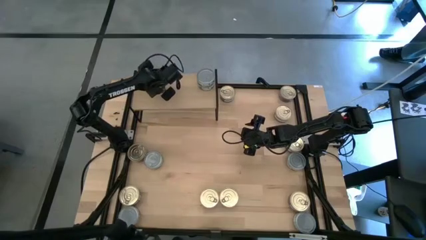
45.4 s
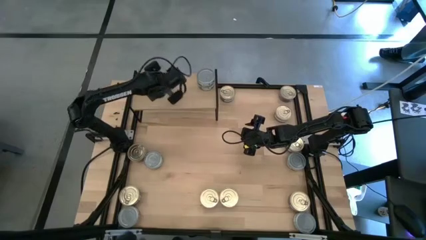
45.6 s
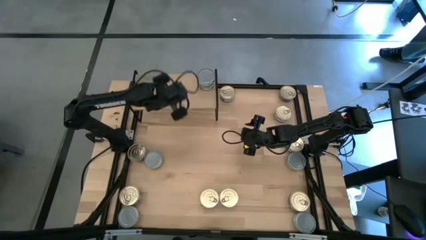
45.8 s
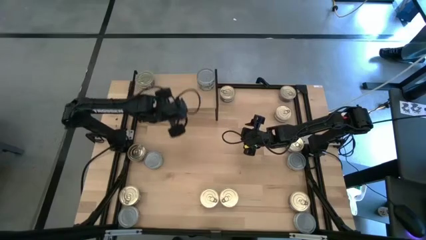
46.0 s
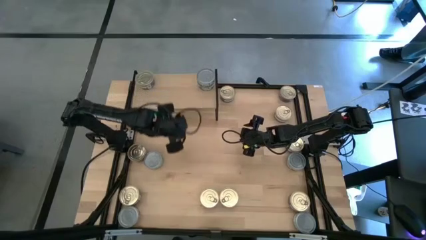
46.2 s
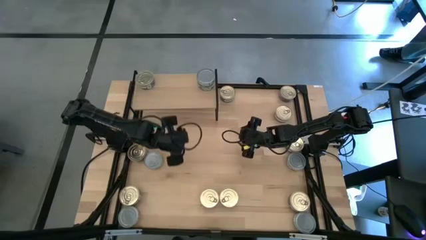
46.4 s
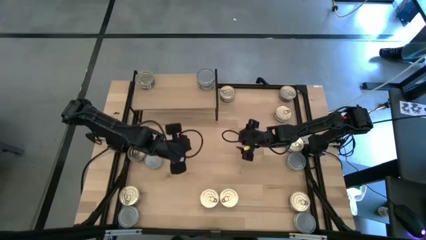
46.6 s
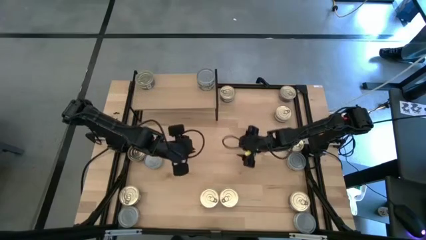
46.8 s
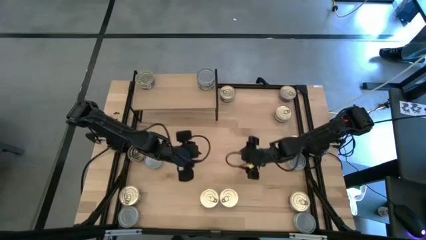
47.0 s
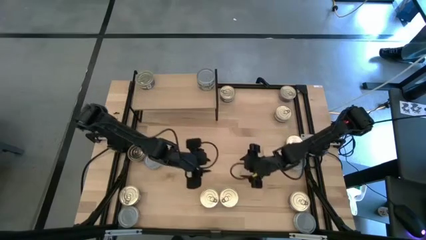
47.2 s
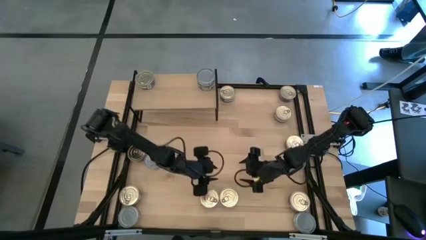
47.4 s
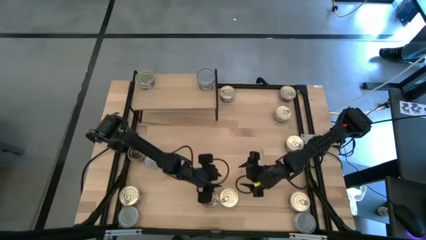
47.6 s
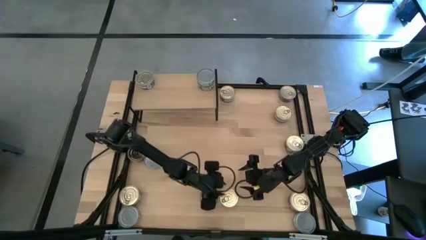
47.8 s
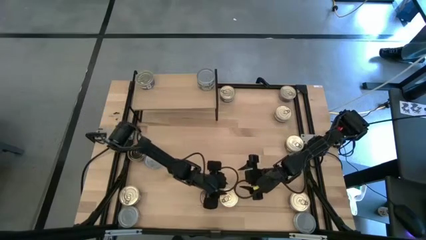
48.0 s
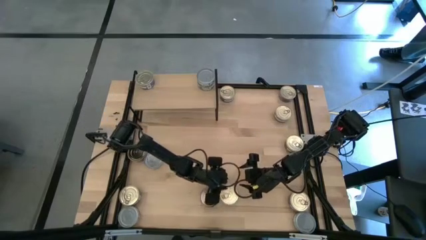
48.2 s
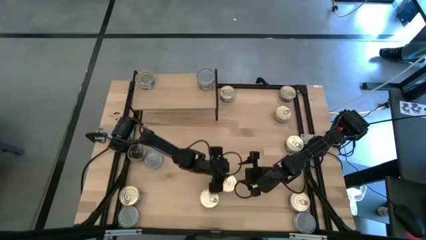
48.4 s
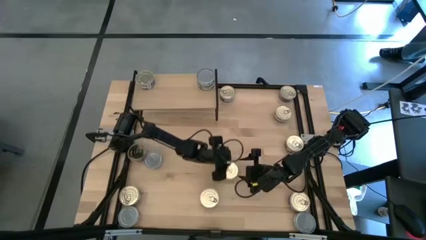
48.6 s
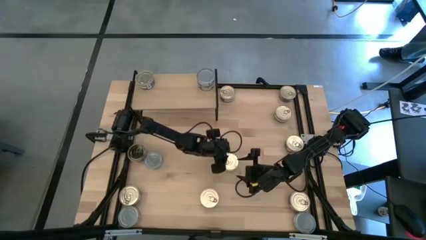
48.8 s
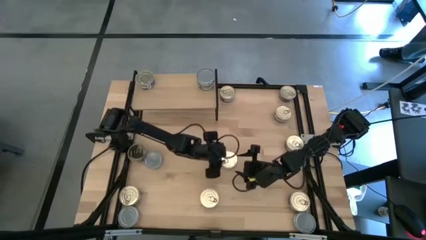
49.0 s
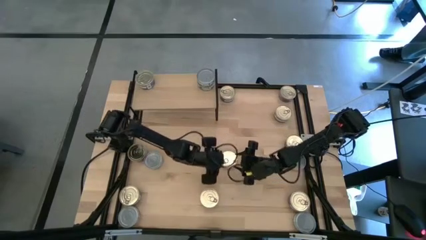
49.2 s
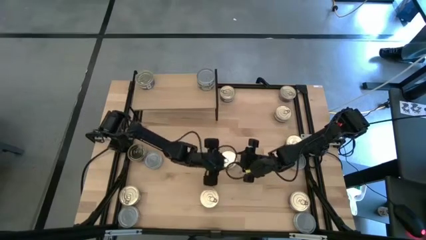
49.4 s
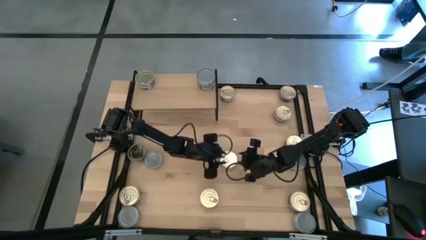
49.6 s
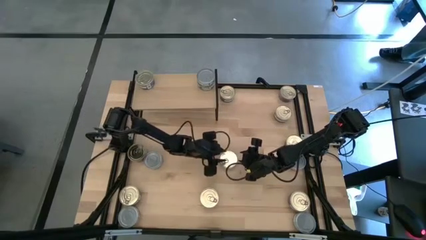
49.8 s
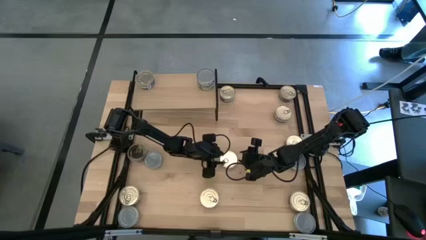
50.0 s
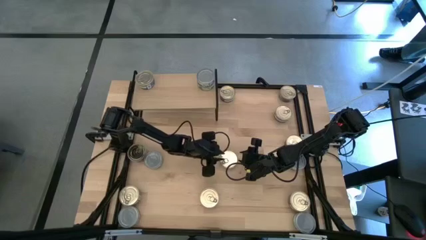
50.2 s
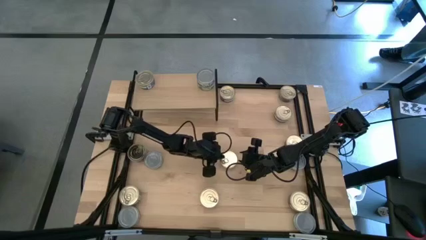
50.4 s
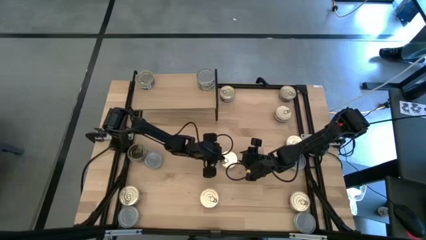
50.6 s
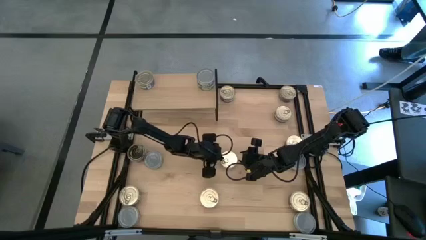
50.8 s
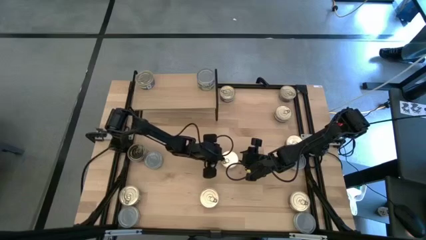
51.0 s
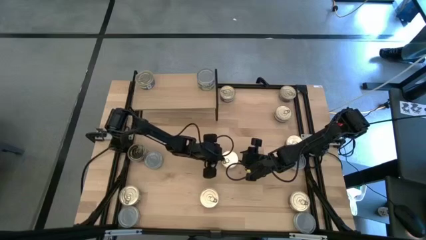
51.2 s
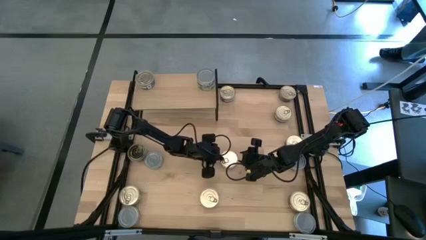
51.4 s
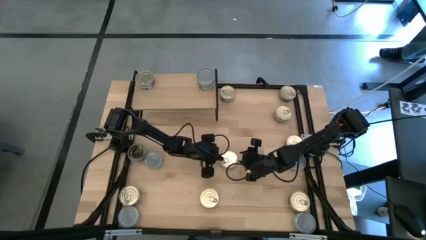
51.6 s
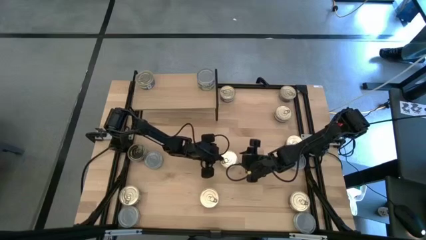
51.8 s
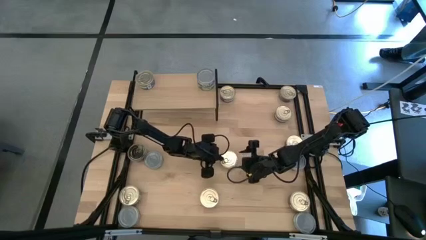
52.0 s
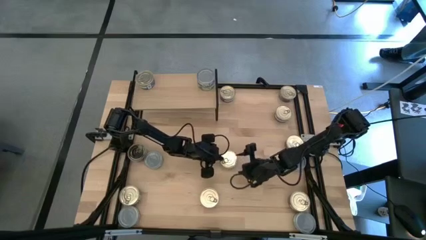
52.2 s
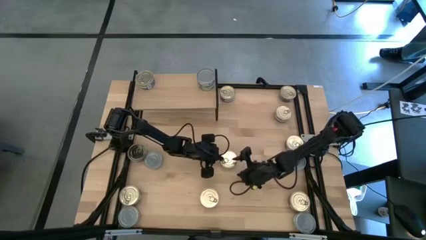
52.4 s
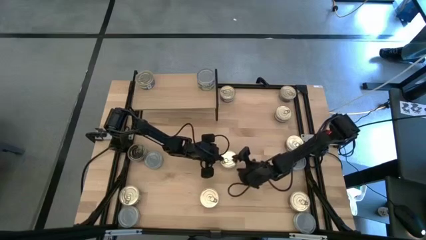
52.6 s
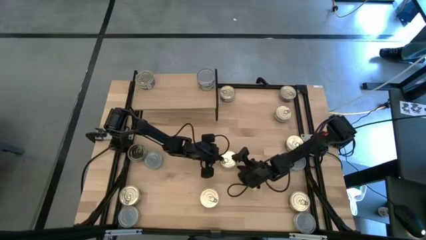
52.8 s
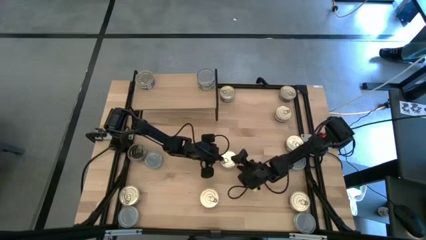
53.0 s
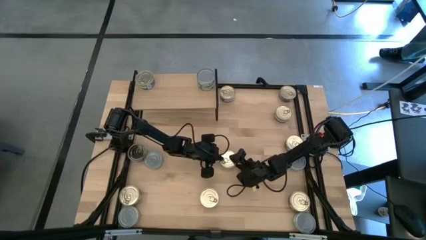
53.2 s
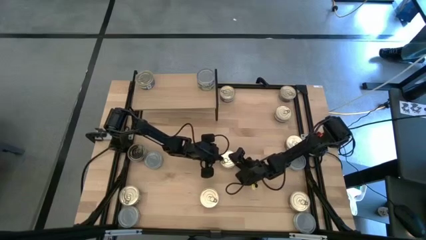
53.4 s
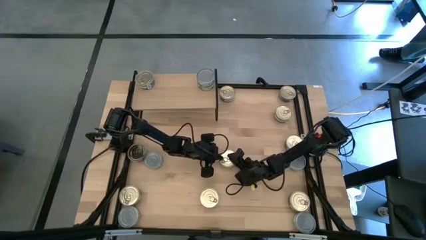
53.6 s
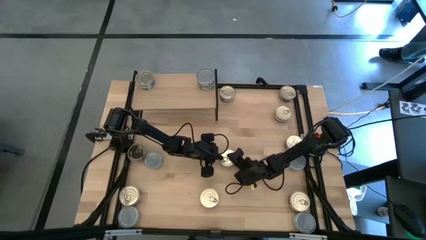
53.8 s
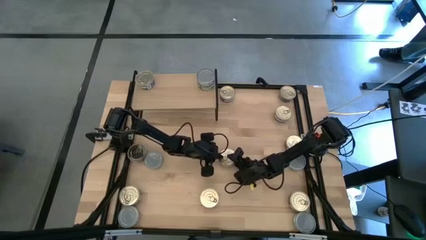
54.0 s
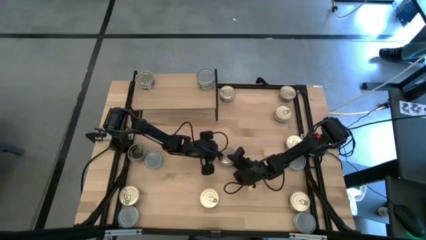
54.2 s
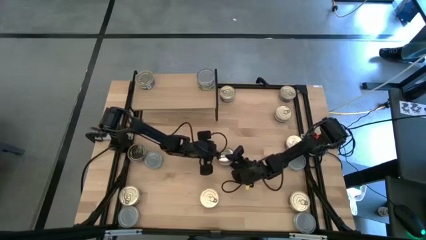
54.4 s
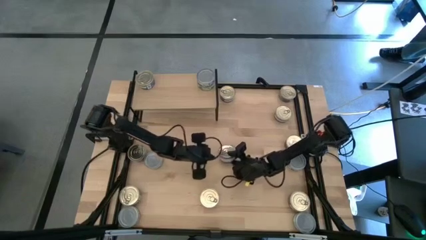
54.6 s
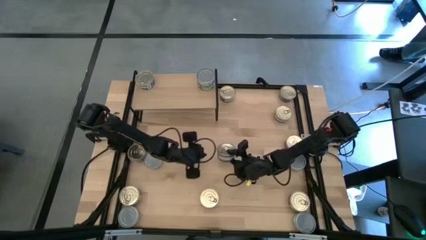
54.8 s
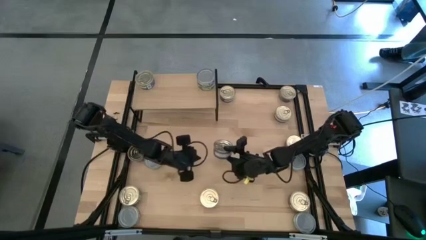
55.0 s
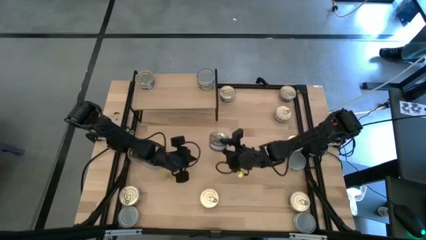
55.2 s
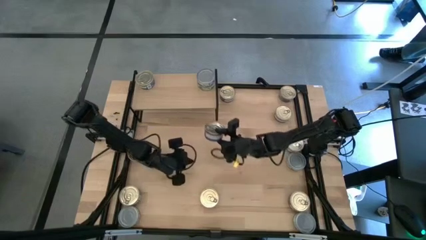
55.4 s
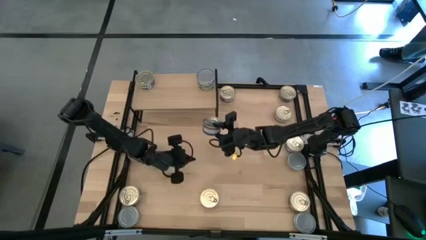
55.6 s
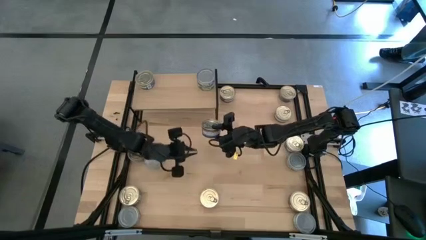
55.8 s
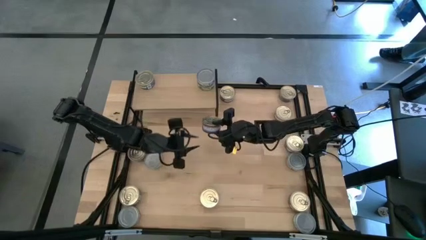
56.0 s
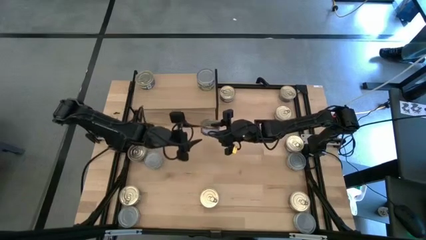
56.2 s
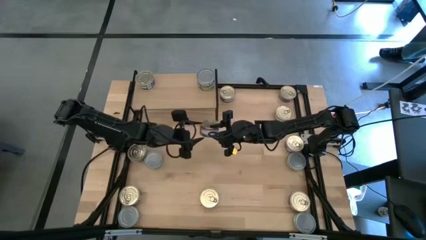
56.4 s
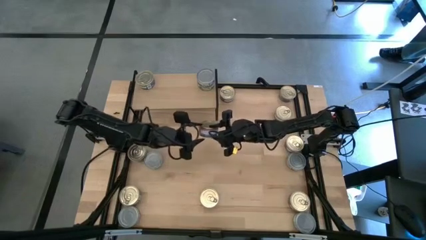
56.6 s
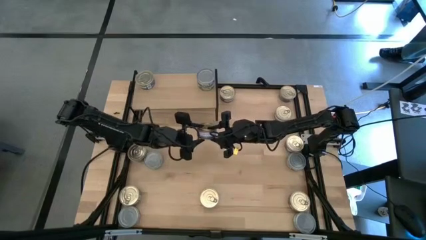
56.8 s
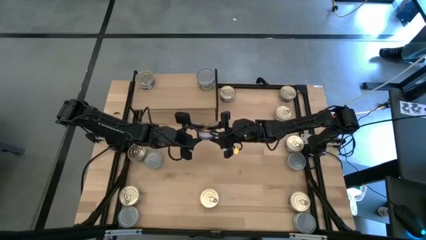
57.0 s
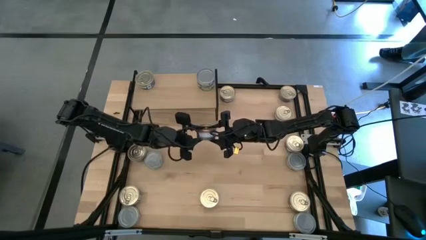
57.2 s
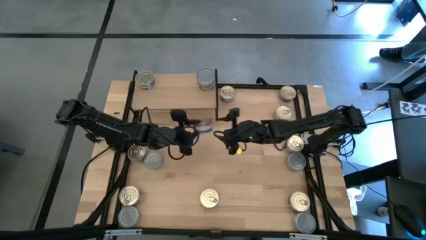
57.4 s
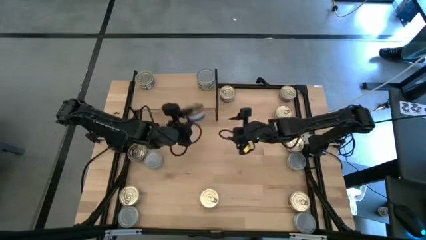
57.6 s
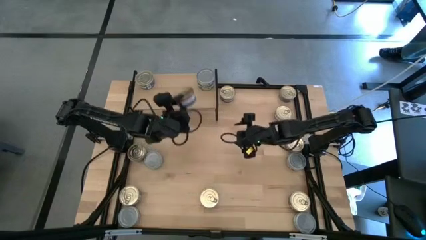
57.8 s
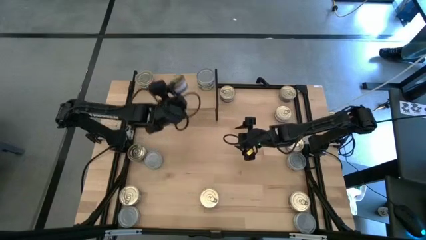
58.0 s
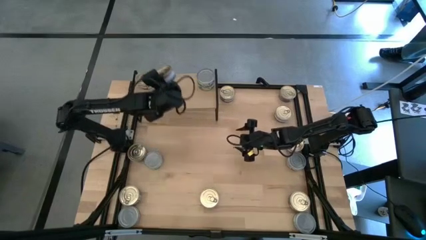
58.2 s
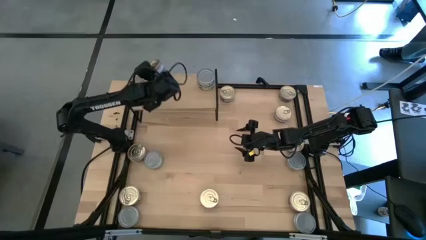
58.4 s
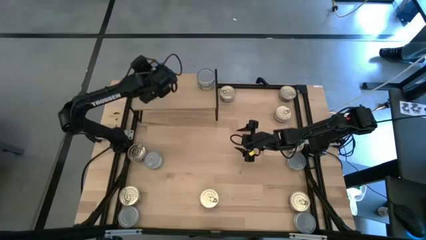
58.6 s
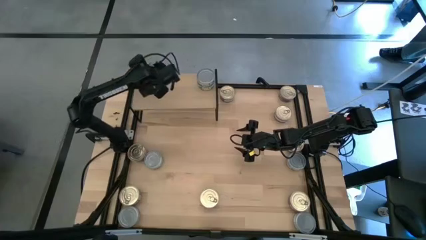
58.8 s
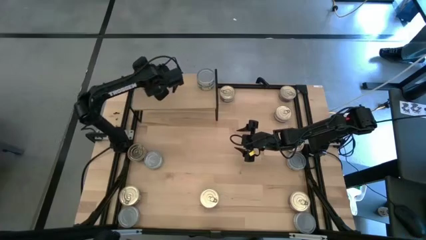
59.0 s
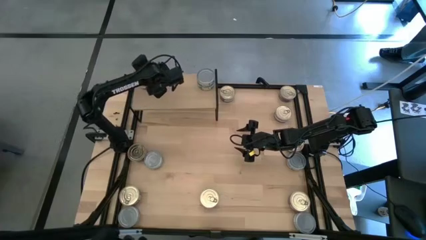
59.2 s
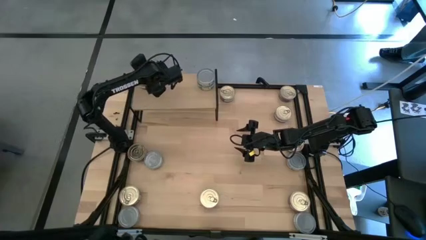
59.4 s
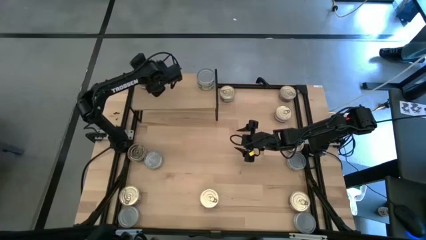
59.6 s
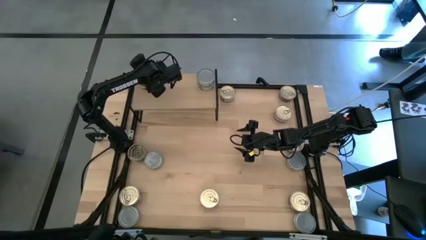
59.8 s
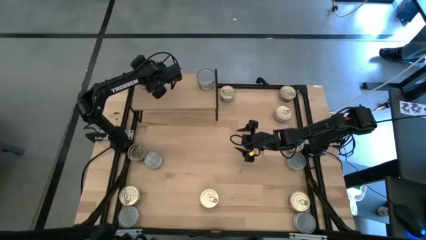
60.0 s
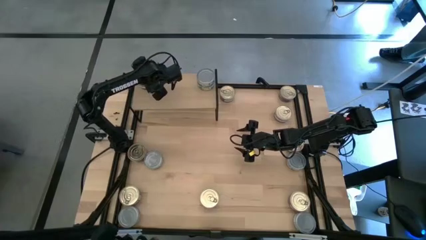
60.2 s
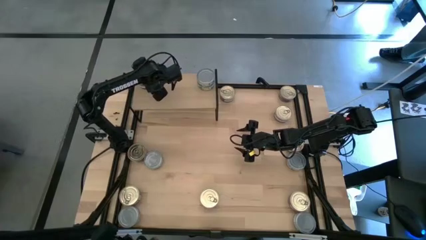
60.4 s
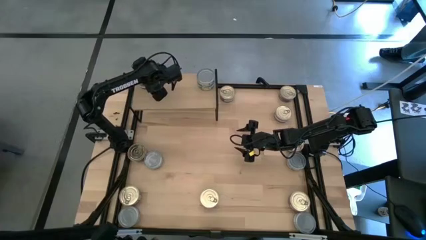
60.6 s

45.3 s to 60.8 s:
Task: Stack canned seafood by type on shelf
Stack the blue tuna on top of the blue tuna can on the shelf
